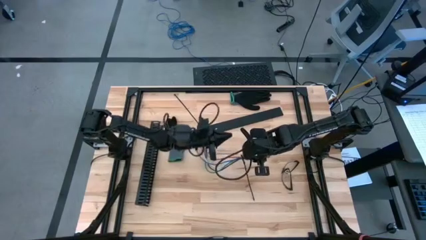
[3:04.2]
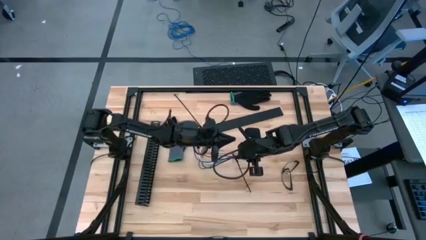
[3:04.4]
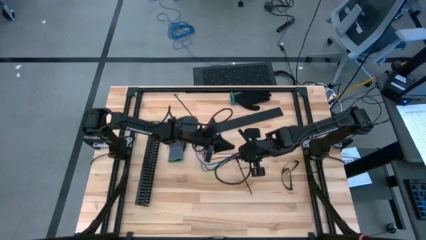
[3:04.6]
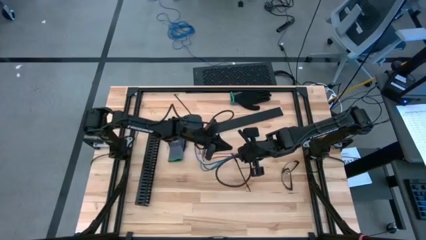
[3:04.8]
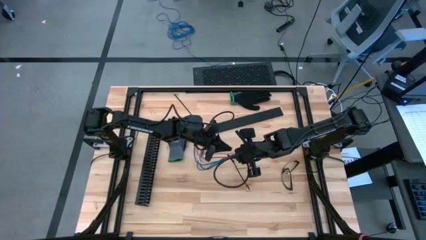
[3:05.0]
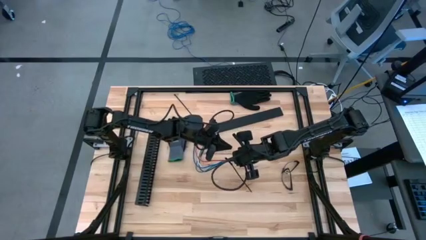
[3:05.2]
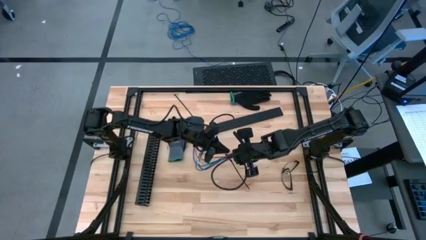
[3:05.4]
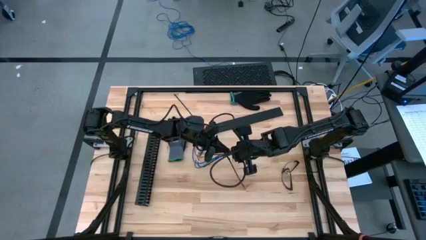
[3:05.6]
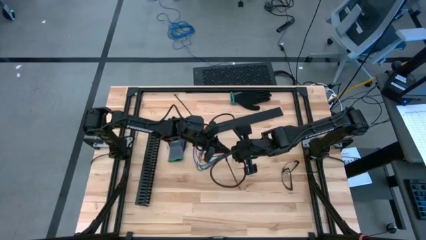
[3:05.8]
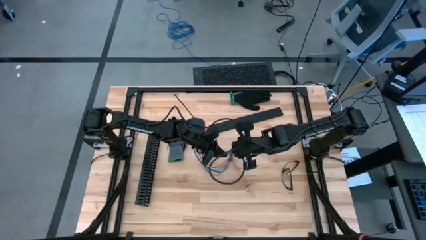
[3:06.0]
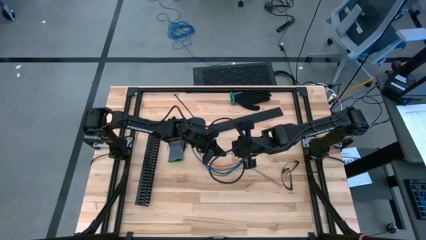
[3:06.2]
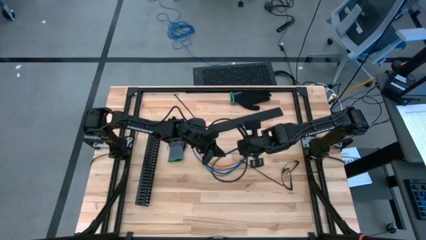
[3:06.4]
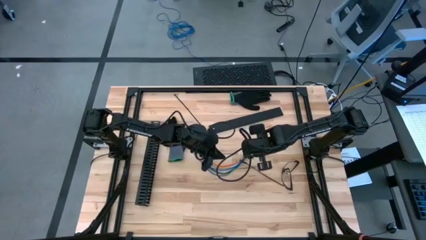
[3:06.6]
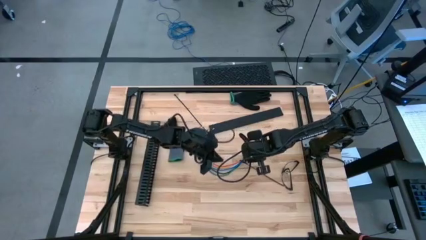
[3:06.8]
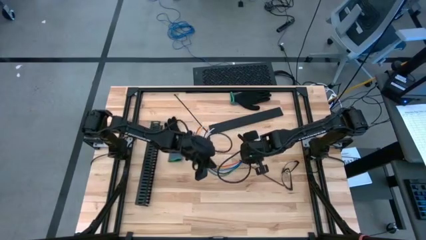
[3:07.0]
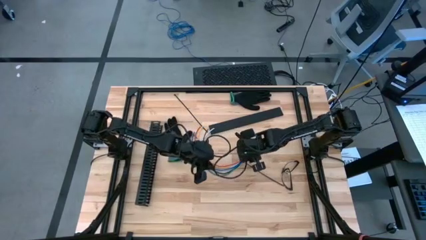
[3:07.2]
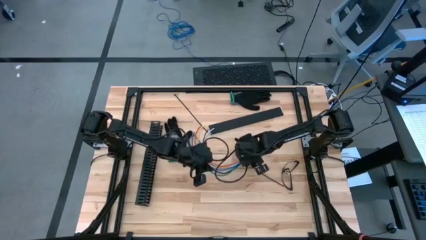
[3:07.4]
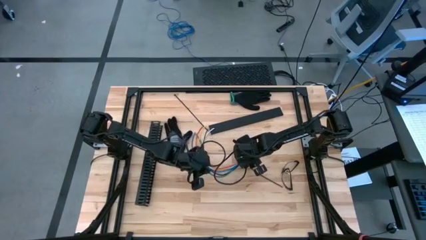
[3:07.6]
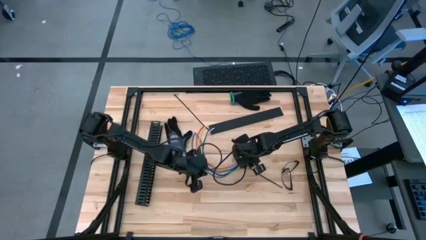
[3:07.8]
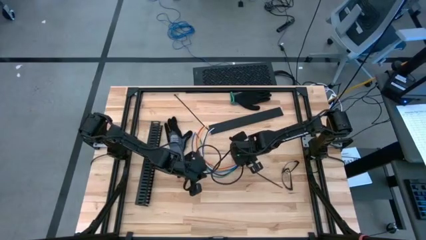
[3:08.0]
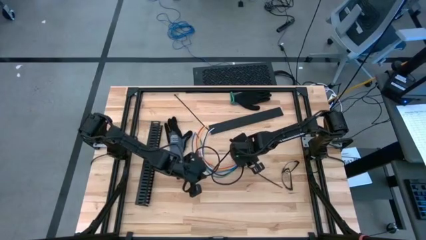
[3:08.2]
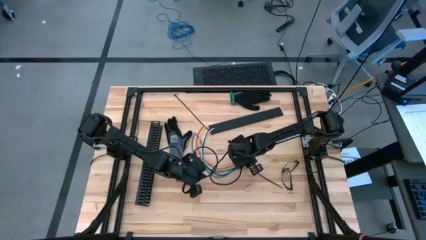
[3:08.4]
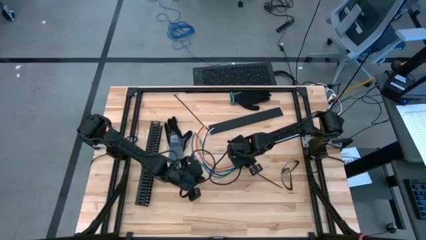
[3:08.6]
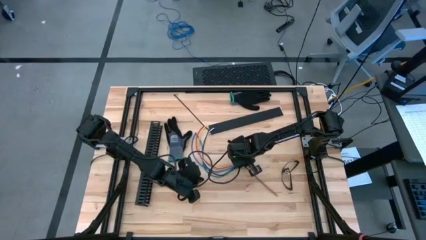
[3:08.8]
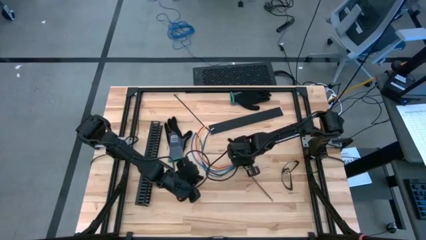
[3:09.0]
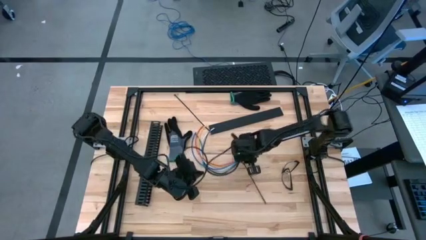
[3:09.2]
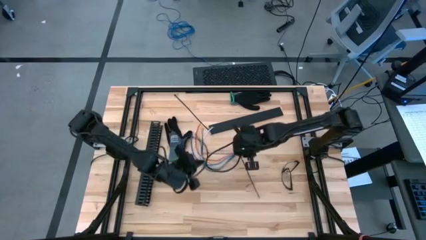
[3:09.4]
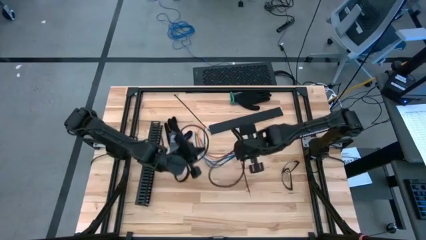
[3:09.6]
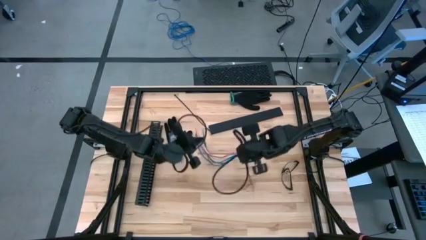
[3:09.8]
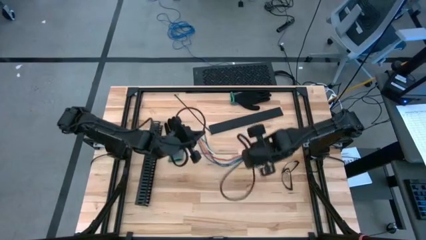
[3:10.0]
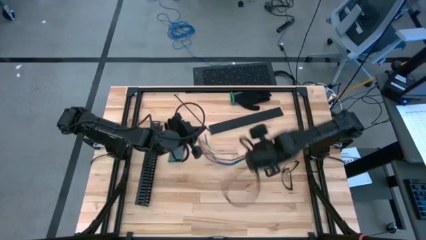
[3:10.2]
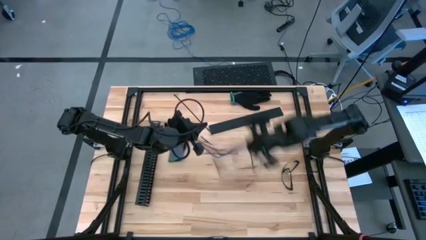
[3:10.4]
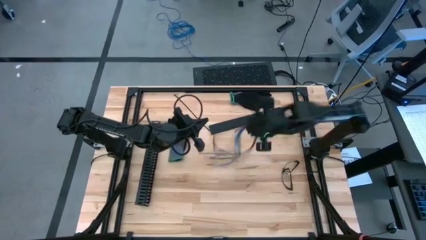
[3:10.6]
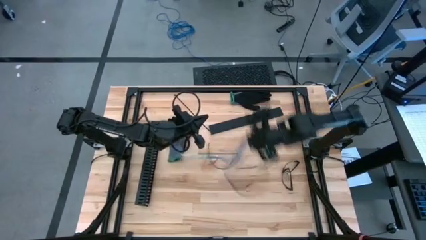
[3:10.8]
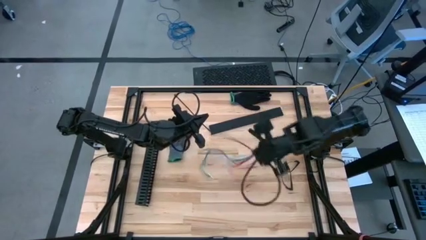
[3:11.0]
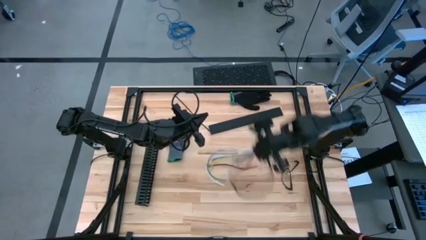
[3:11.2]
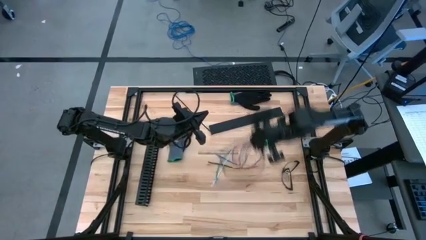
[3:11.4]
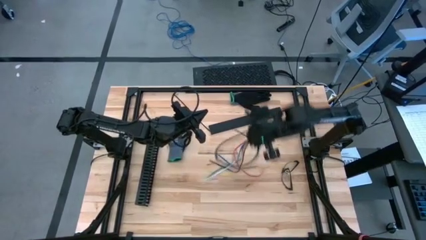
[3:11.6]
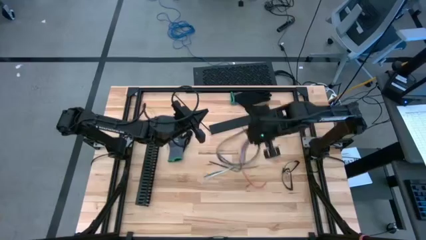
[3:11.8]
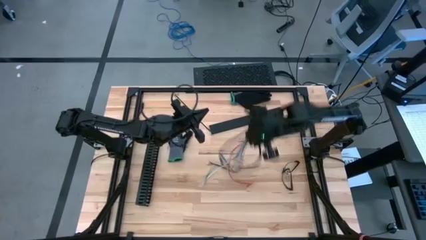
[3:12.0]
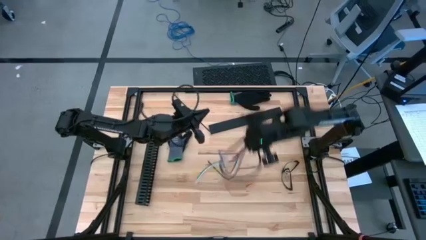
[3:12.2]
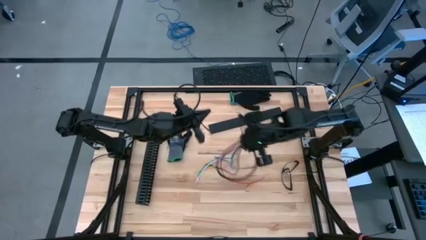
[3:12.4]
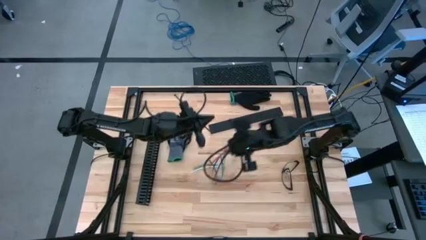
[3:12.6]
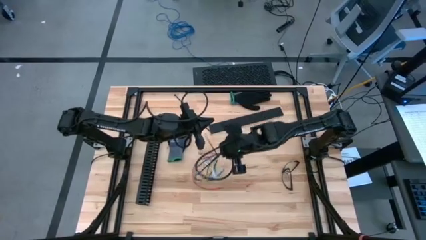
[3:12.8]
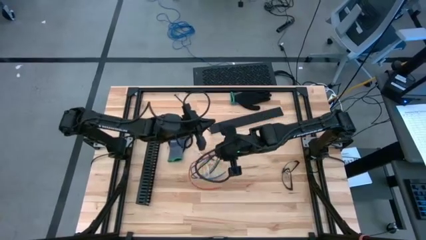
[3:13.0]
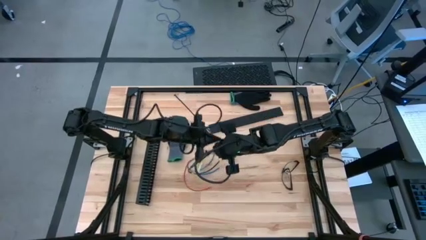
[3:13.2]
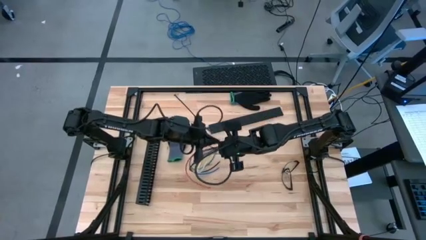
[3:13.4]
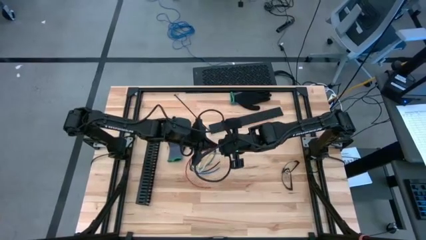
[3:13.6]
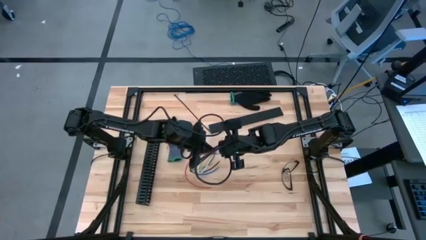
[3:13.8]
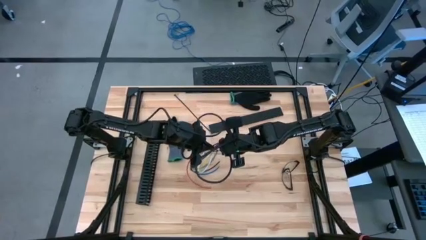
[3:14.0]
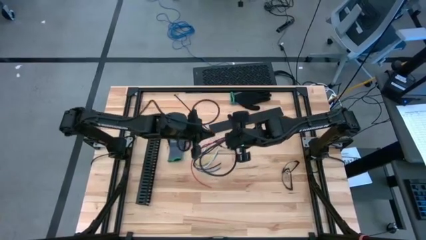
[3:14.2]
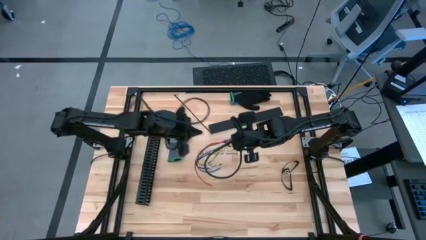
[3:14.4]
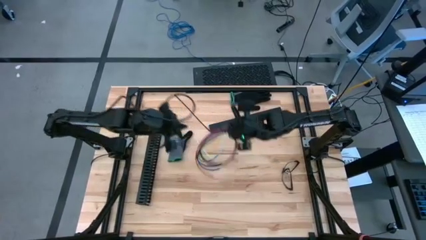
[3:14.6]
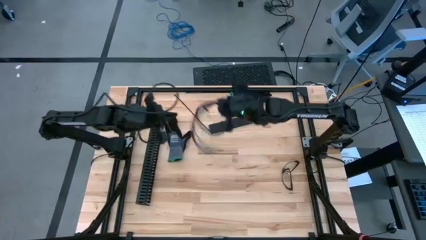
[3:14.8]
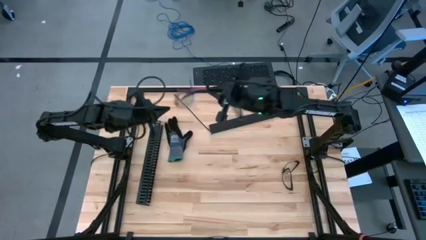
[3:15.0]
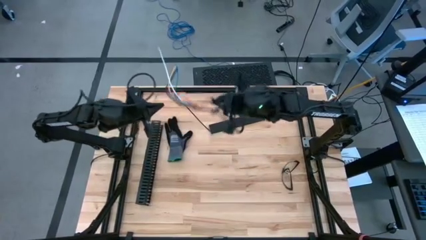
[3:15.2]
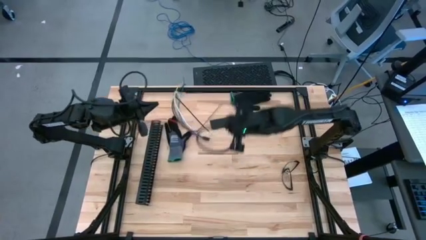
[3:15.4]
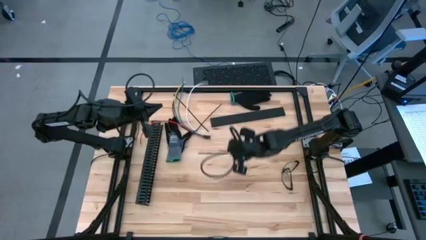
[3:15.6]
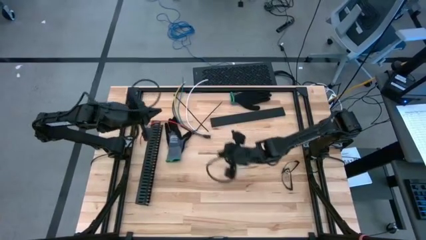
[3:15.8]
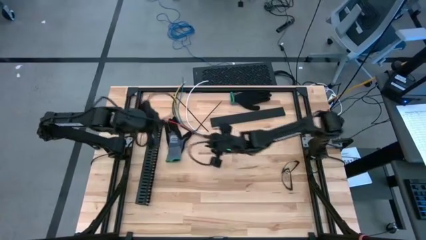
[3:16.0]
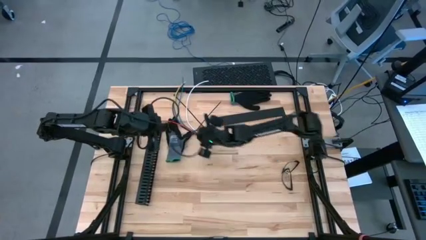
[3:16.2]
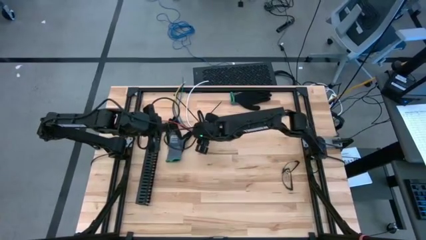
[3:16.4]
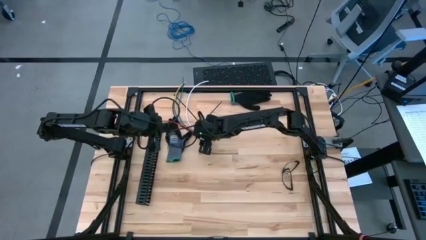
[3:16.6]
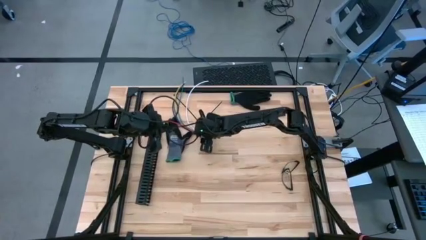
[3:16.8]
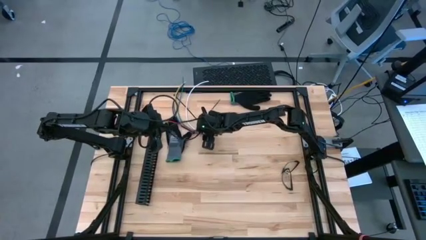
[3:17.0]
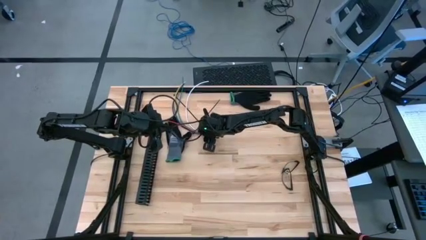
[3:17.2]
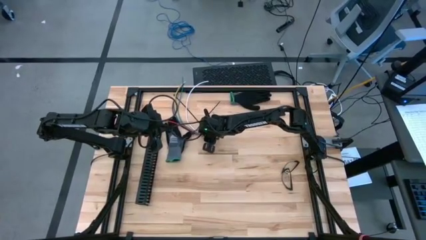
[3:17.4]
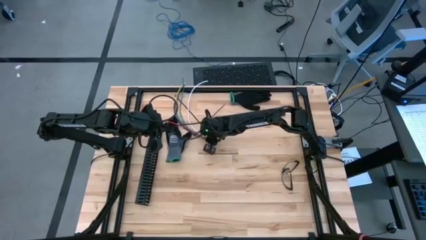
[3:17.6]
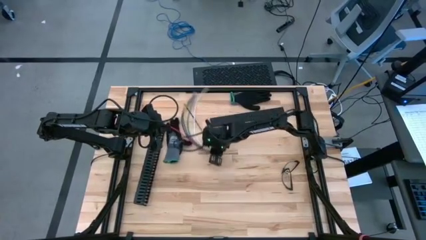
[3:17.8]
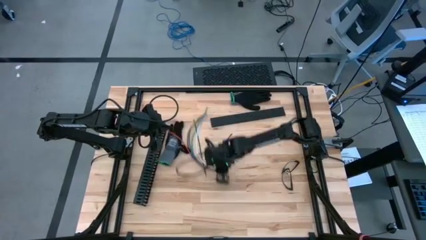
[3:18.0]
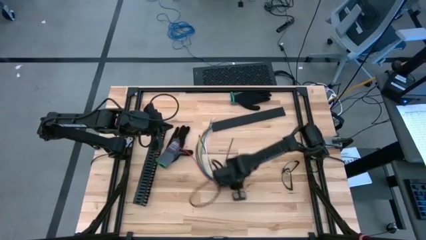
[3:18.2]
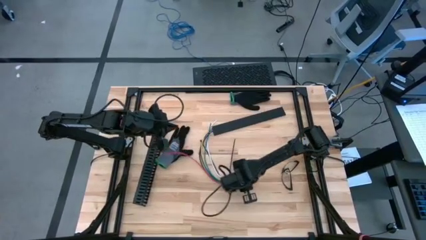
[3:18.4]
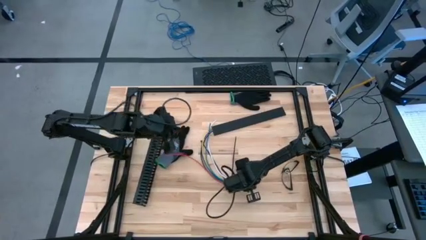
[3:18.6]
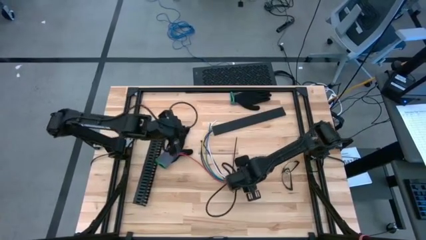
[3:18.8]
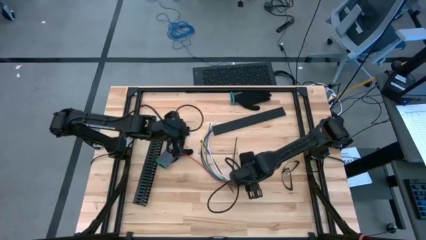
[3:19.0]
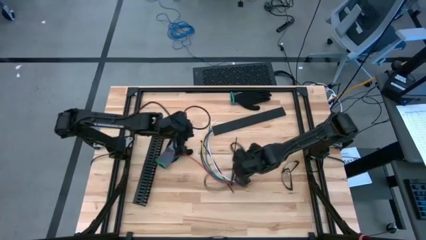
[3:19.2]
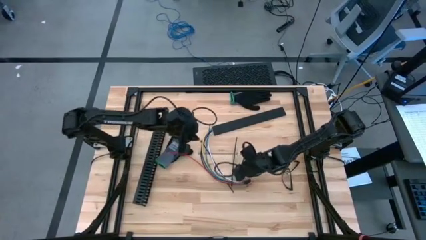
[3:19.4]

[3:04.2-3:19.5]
Task: Ziptie cables
Wrap the cable wires with the black zip tie
